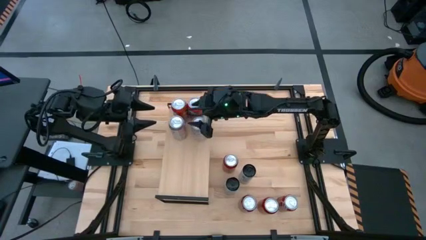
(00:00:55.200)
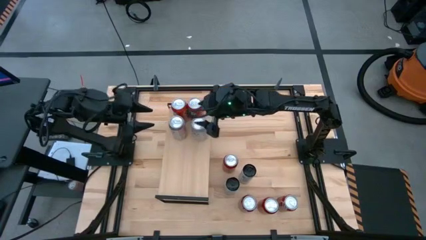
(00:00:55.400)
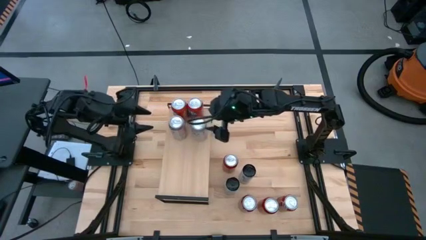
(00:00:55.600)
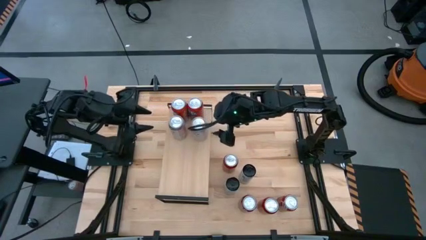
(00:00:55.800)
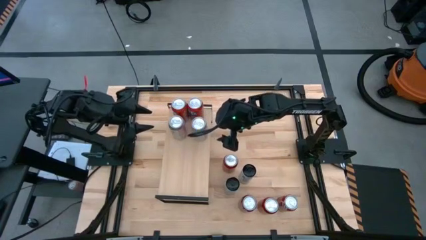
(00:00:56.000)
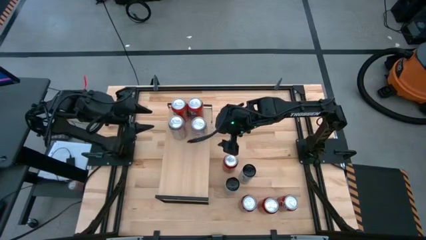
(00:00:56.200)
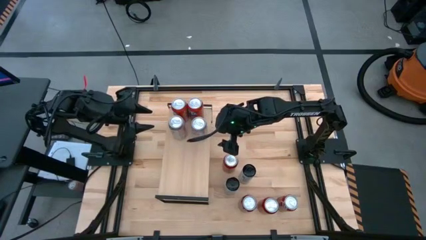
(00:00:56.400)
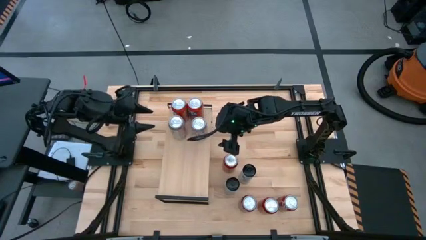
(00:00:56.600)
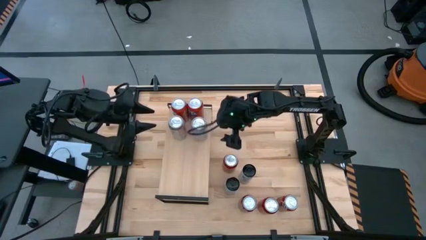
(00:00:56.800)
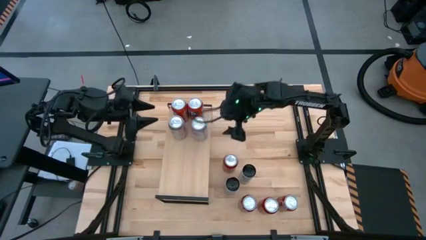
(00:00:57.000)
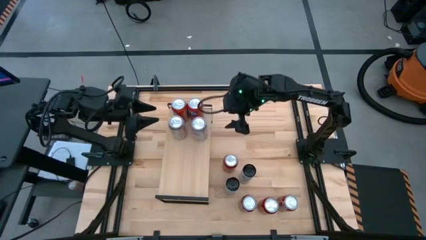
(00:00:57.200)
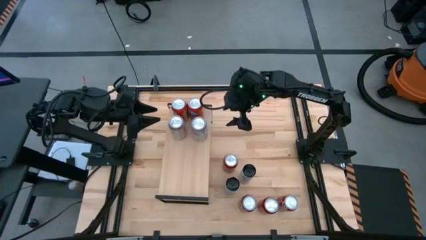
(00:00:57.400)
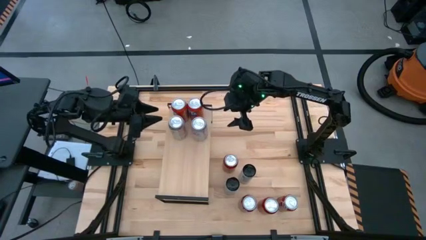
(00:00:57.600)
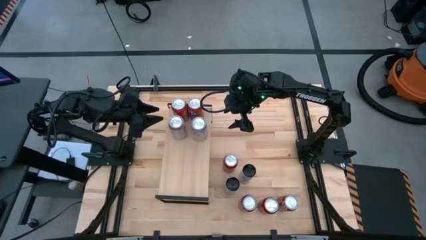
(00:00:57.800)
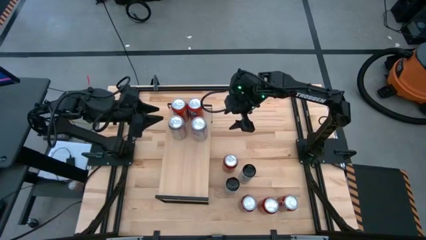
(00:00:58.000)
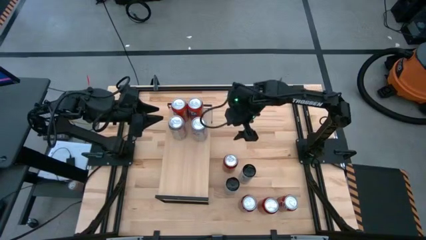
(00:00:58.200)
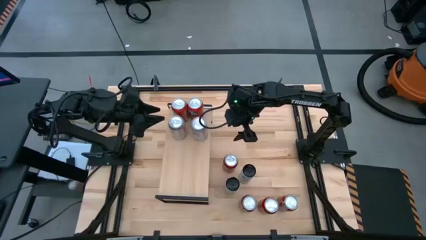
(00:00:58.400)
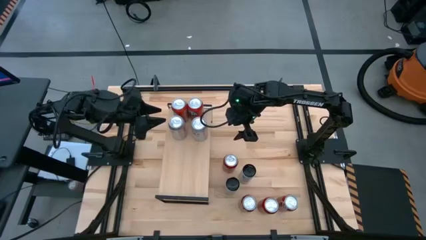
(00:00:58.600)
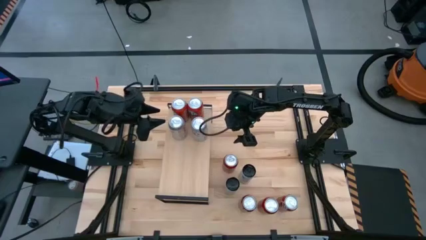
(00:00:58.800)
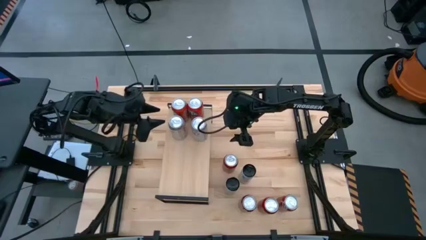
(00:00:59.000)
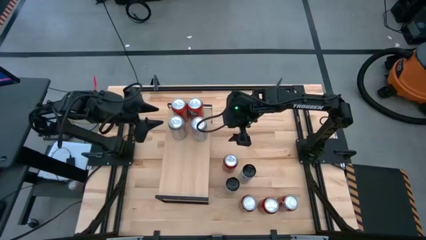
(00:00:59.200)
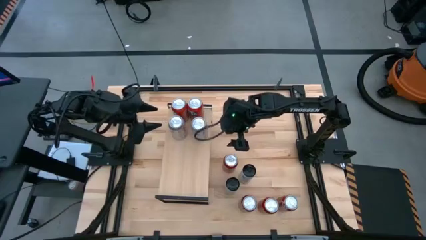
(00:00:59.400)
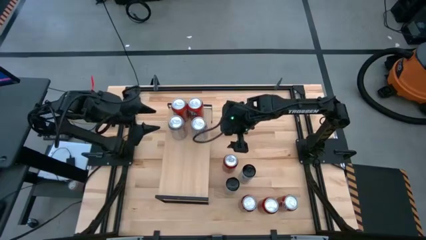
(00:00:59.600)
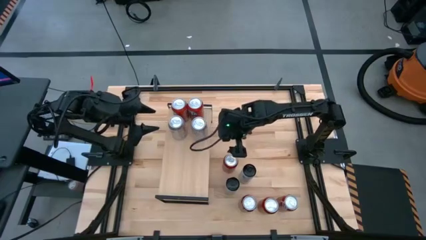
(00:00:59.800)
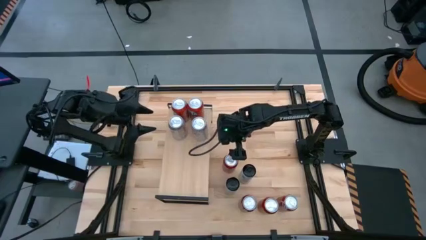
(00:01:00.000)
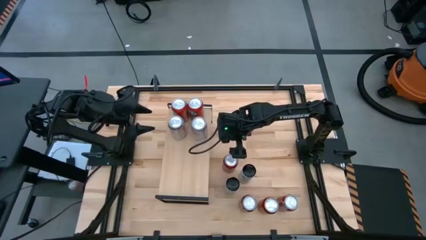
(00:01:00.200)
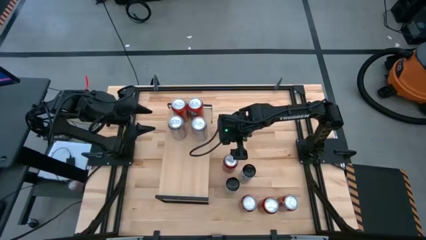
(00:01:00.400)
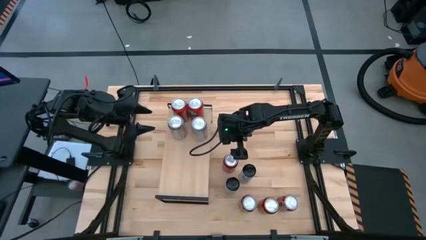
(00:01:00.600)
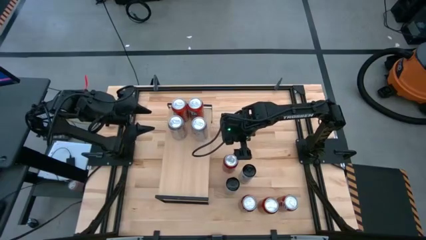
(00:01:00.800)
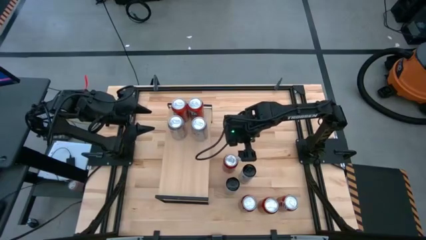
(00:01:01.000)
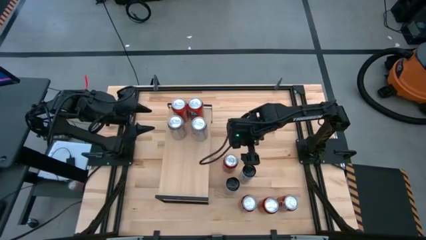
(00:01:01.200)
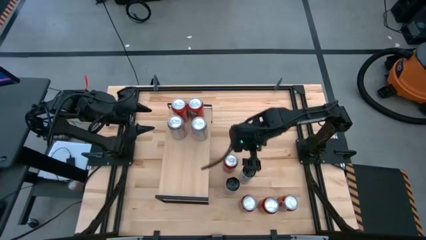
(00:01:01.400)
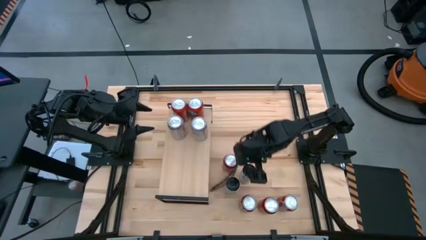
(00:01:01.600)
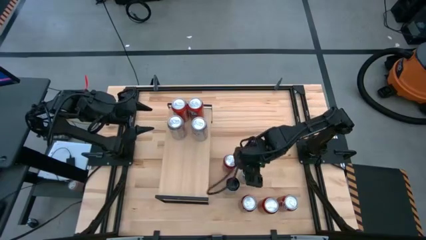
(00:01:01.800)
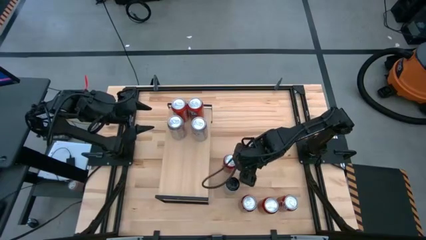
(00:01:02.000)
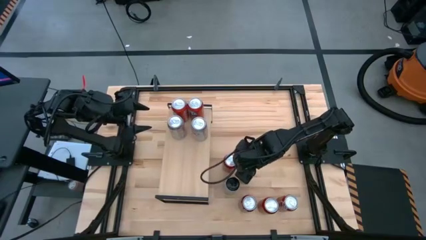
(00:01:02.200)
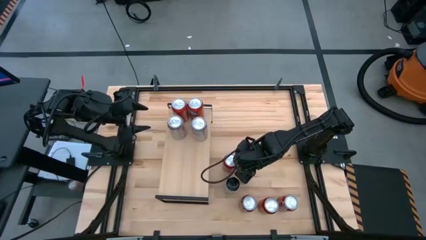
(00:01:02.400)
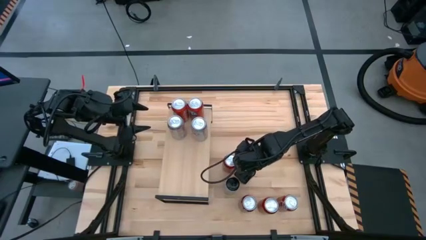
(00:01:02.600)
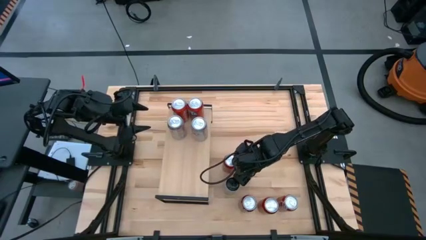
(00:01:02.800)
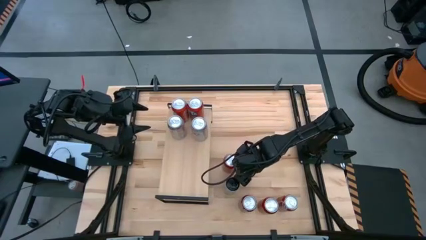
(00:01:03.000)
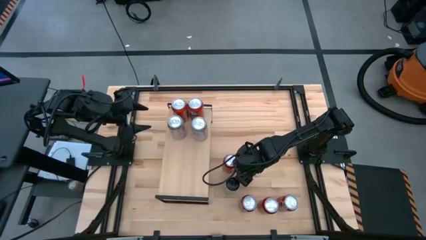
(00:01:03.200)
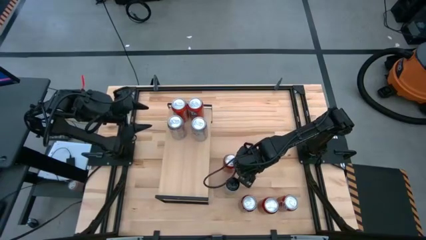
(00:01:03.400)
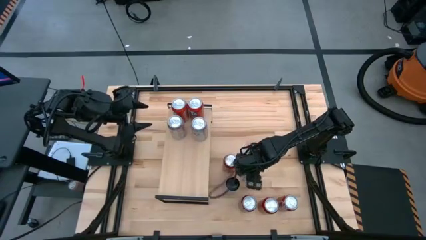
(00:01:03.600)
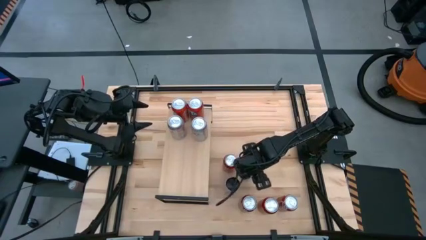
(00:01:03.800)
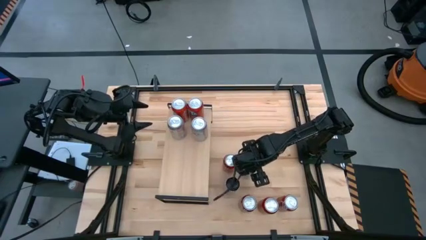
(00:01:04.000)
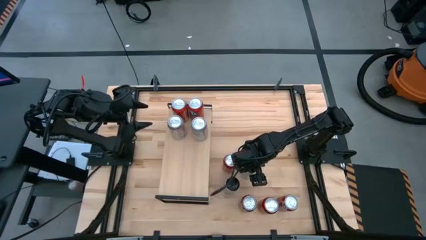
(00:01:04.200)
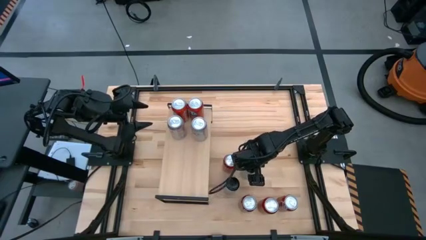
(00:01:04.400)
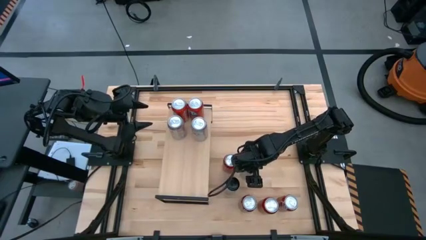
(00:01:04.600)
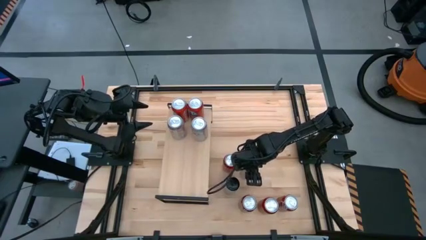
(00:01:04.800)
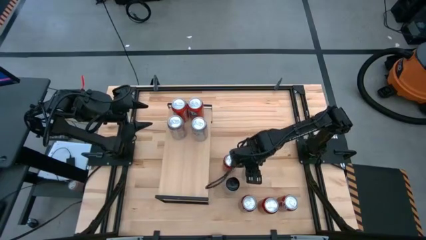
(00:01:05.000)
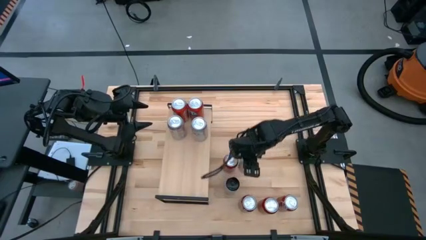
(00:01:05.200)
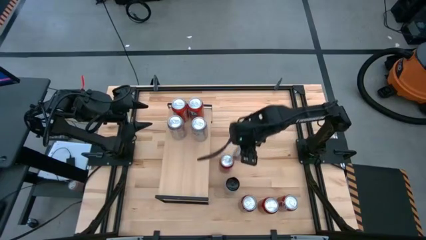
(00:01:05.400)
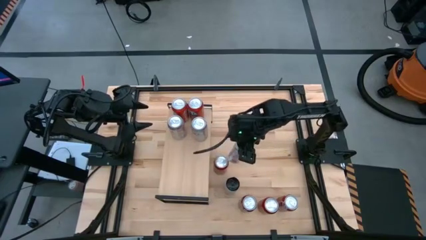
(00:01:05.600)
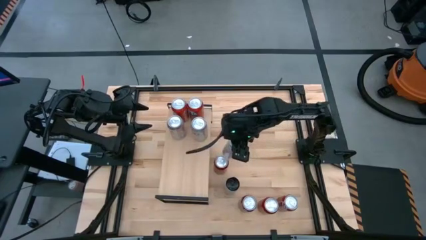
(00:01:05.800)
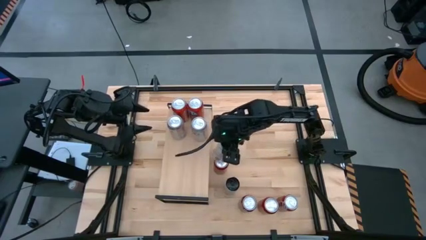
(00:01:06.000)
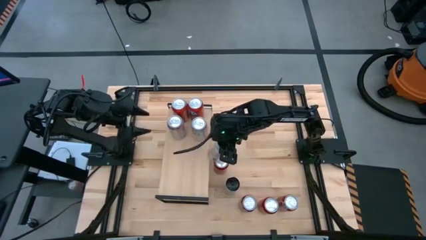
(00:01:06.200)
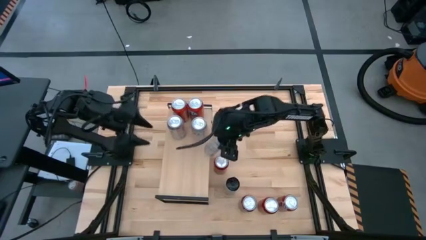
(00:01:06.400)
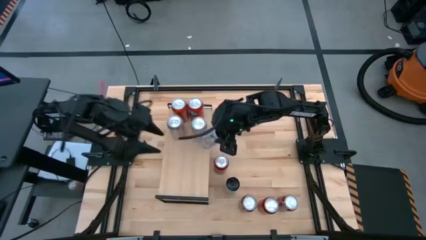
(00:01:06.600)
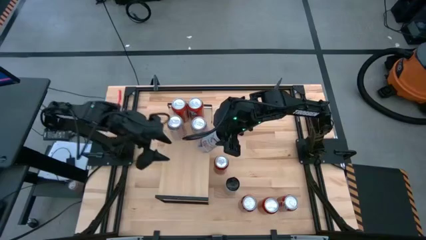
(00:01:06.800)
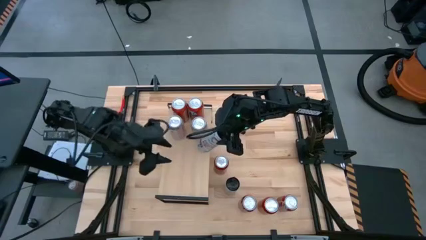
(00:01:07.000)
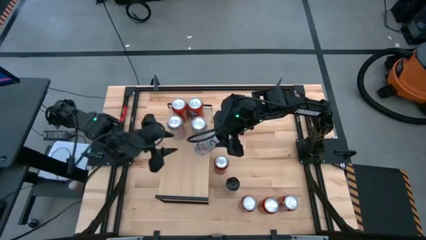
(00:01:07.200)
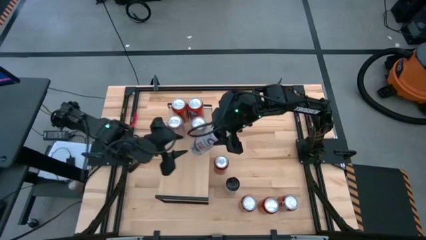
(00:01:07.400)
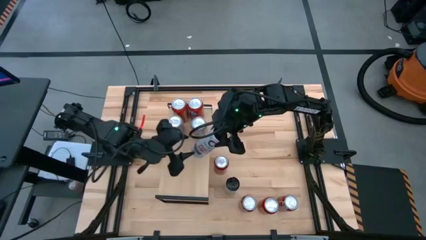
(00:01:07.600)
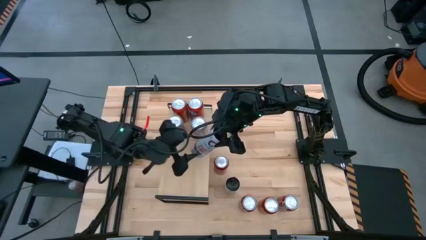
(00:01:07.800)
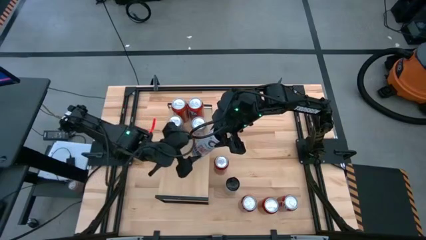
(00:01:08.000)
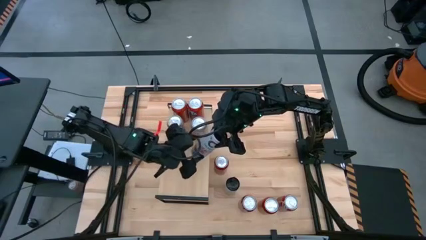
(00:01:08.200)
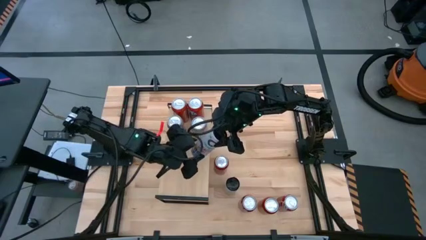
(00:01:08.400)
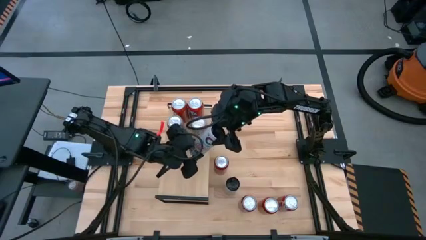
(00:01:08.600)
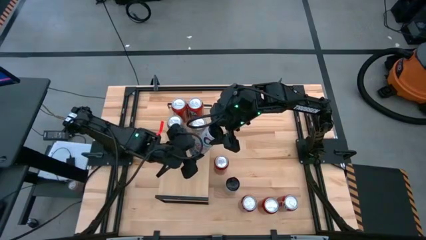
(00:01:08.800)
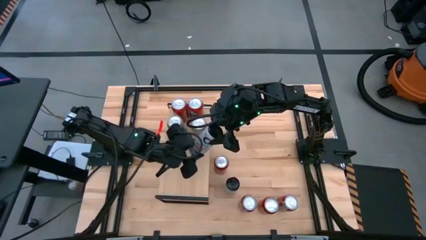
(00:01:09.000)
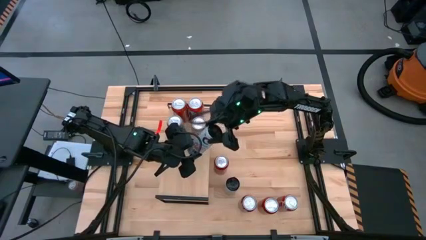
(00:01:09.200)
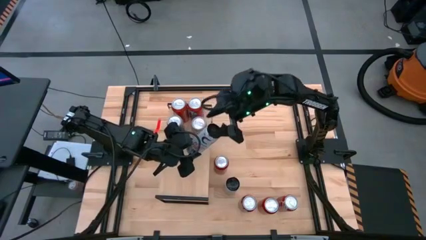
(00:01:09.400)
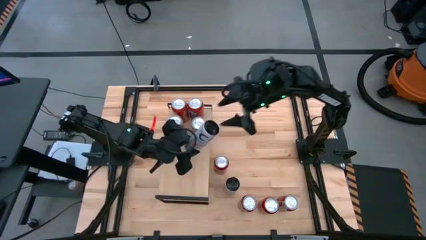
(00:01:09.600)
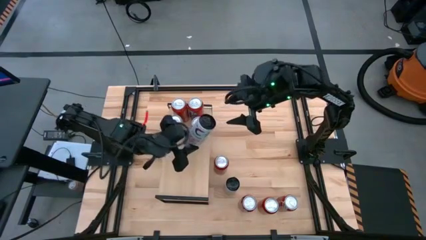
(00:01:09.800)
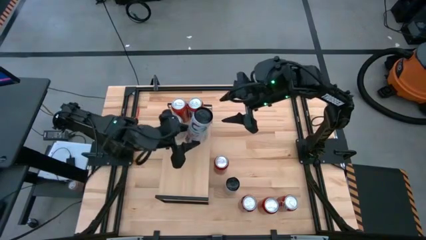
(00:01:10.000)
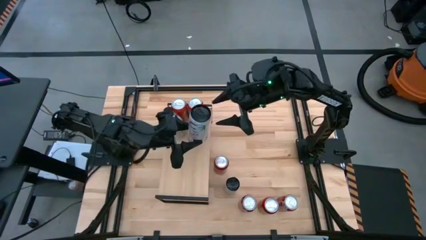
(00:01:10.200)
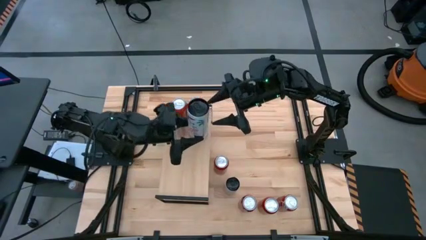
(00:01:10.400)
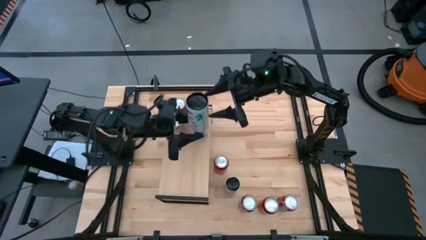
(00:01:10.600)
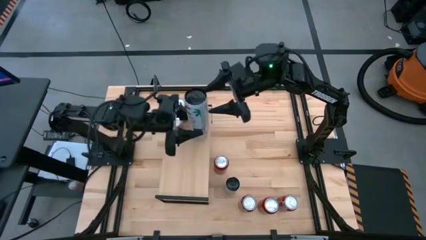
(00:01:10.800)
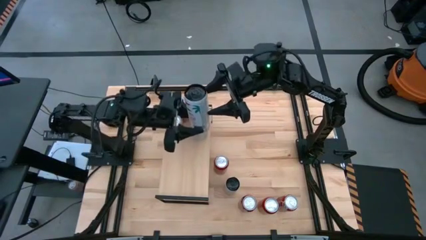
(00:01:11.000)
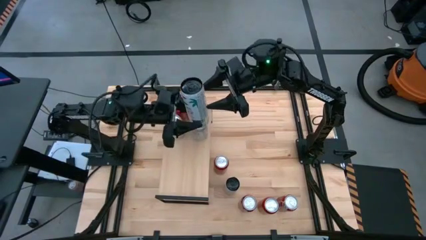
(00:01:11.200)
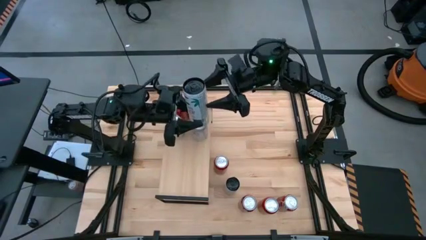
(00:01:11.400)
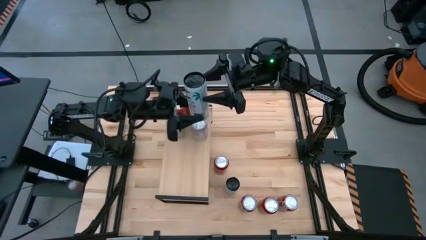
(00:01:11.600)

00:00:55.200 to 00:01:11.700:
Task: Pick and place cans onto a shelf
Put the top white-pink soda can on the shelf
